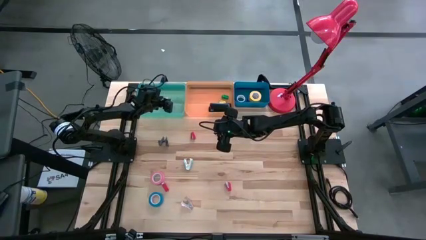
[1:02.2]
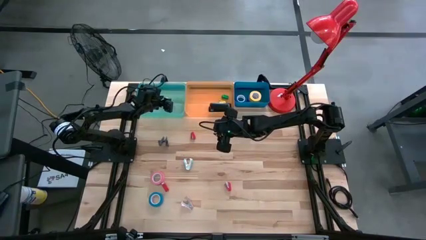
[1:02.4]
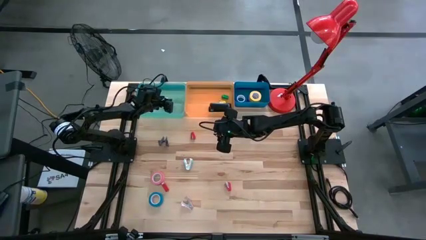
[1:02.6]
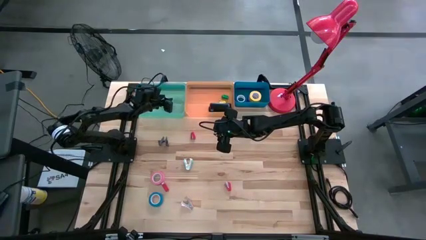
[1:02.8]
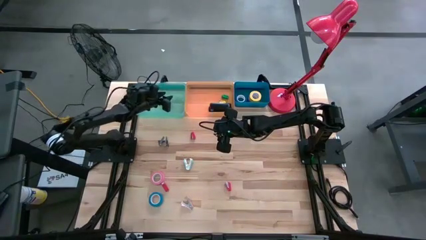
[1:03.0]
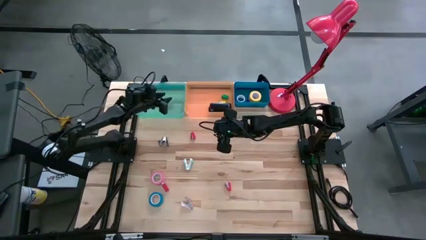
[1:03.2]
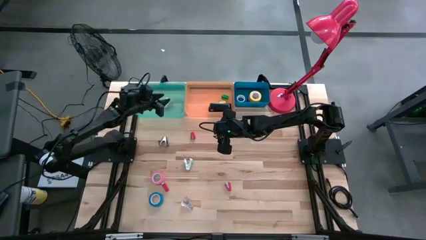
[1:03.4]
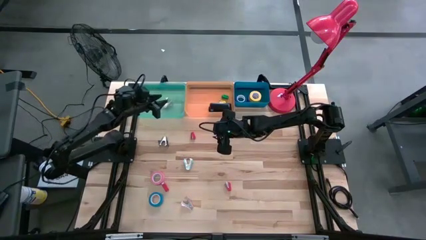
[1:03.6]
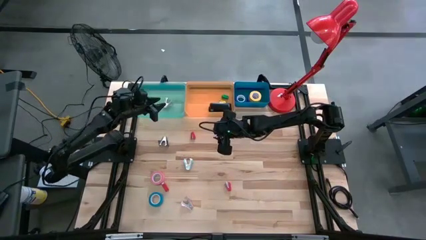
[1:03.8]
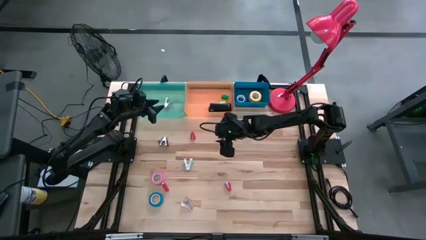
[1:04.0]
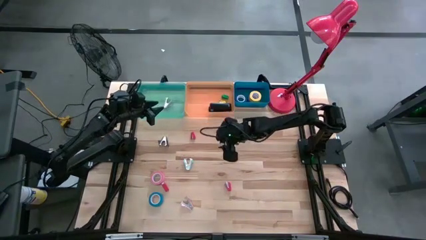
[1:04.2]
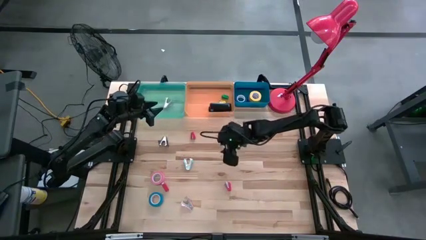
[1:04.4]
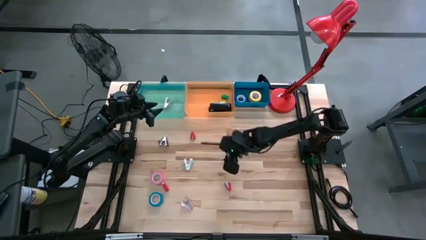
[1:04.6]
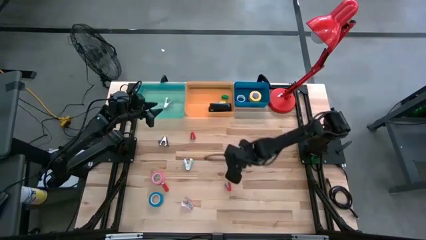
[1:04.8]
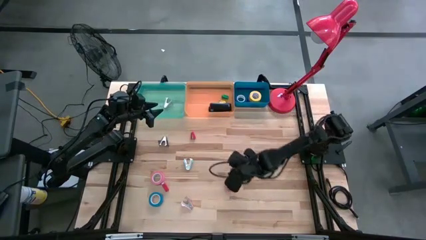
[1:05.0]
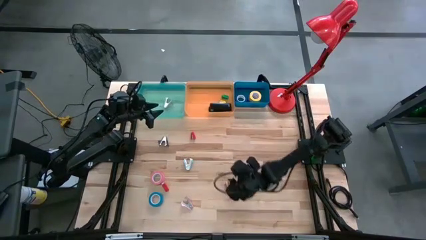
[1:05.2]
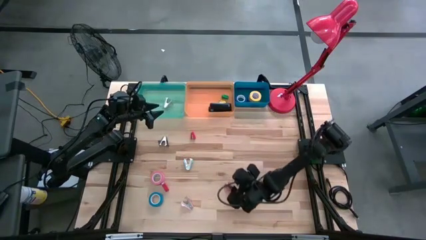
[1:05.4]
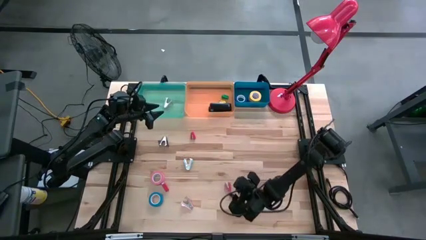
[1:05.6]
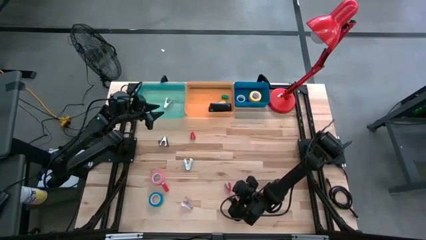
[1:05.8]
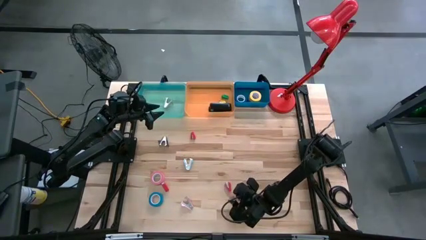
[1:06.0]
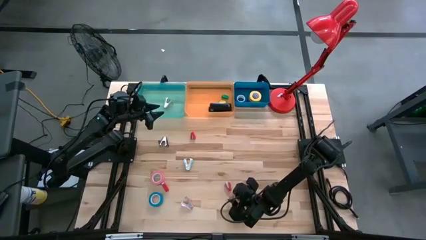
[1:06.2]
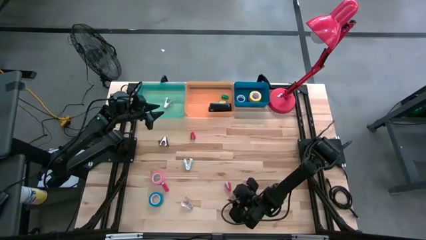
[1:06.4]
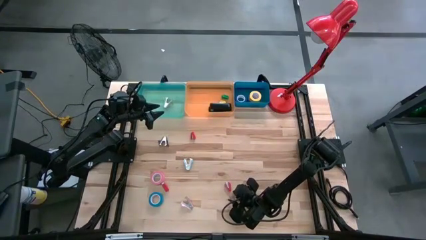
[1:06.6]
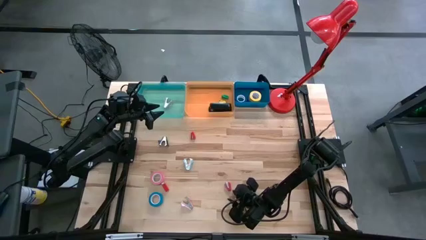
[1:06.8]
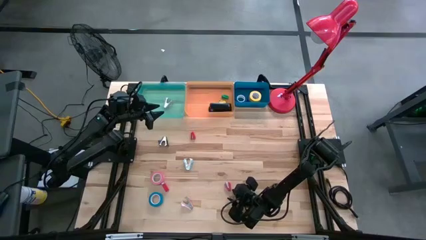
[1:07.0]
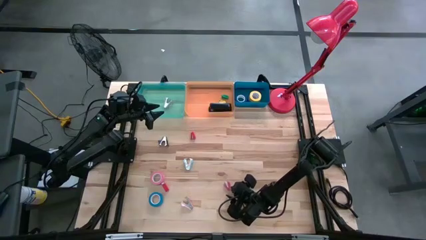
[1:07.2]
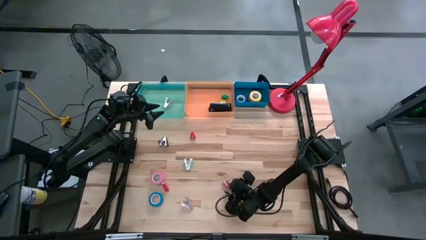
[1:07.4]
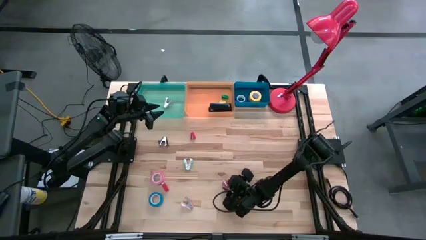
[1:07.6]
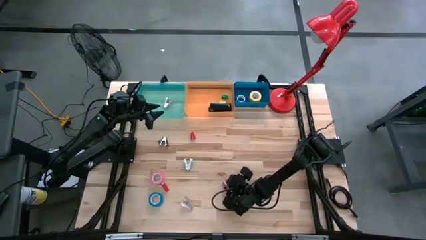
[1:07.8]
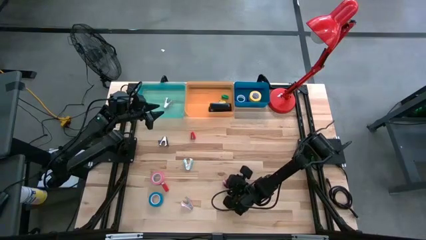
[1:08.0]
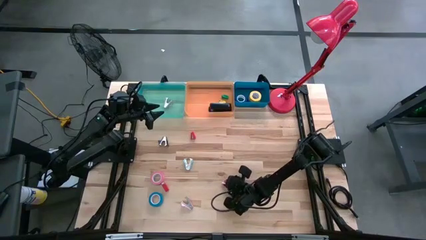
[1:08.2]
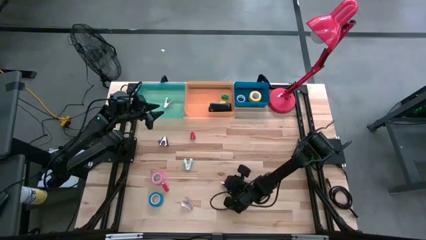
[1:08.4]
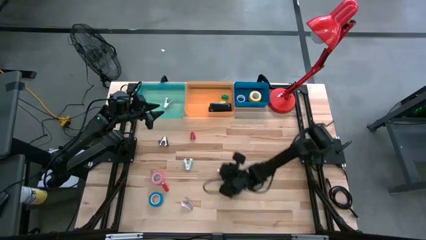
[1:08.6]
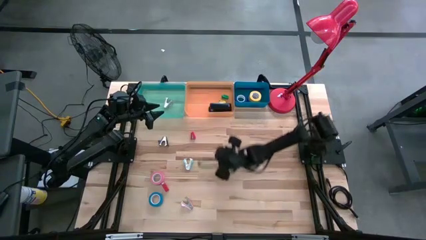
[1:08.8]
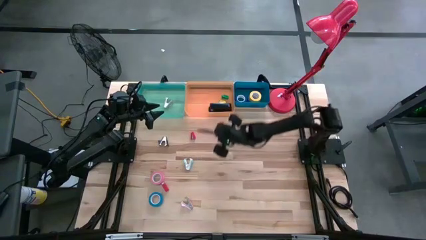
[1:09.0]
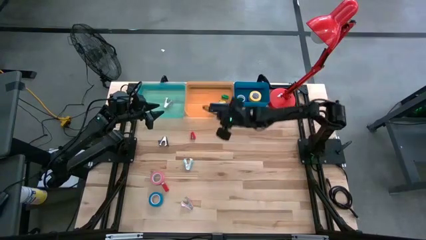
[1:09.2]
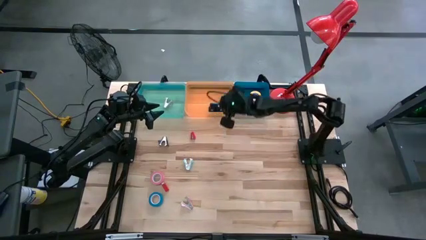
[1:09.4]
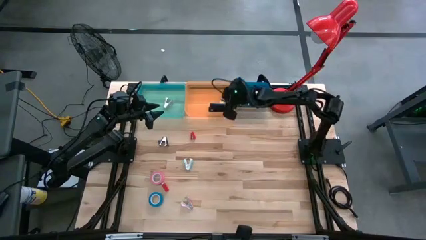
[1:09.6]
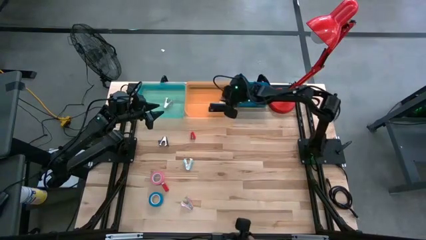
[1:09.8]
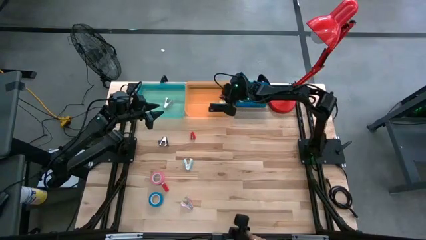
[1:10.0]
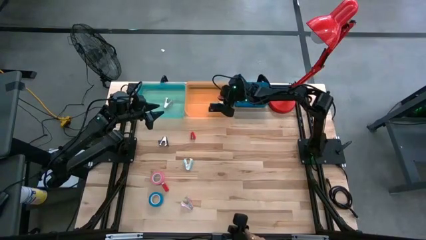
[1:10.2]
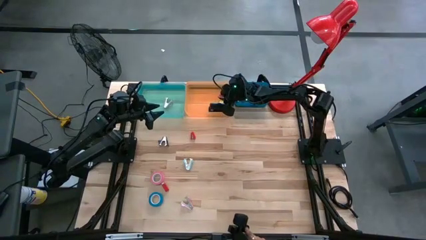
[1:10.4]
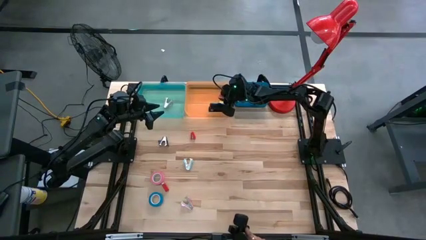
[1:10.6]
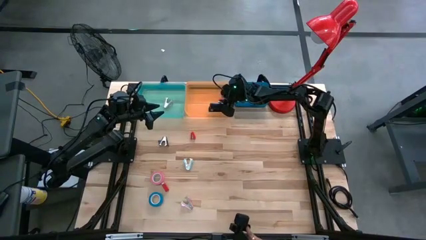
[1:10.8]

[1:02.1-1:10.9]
Task: Pick and place Stapler, Stapler remover, tape
Put the bottom right red stapler into the orange bin

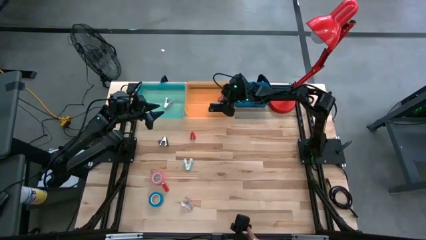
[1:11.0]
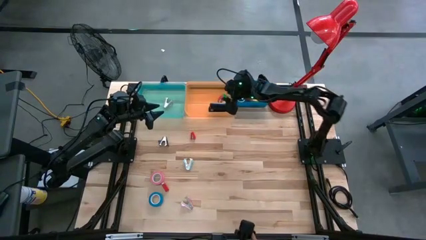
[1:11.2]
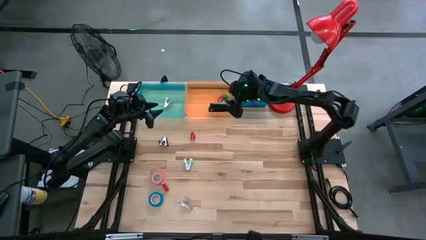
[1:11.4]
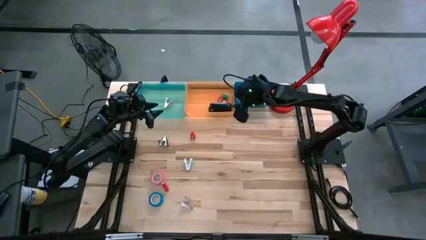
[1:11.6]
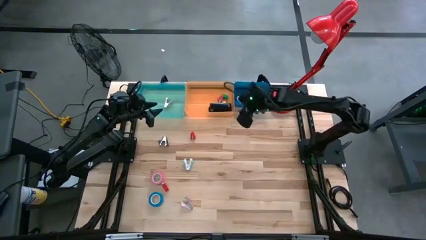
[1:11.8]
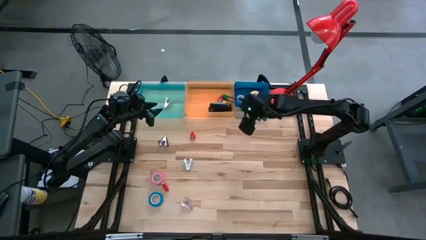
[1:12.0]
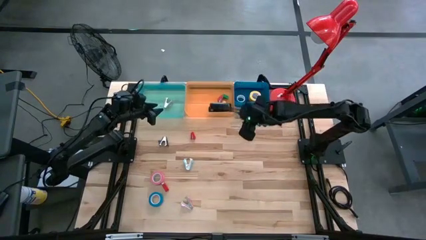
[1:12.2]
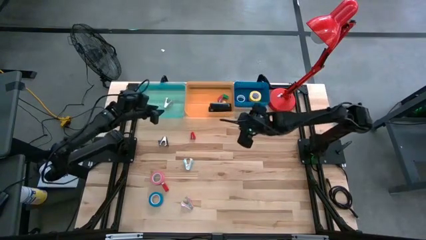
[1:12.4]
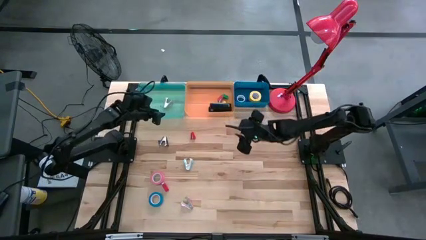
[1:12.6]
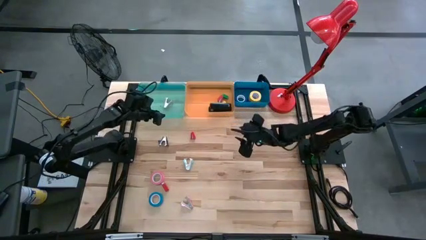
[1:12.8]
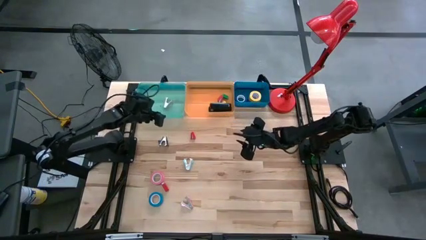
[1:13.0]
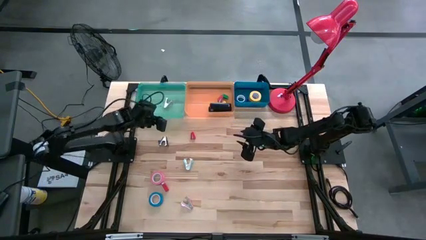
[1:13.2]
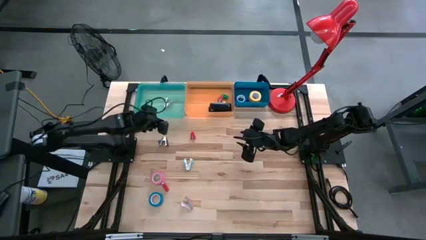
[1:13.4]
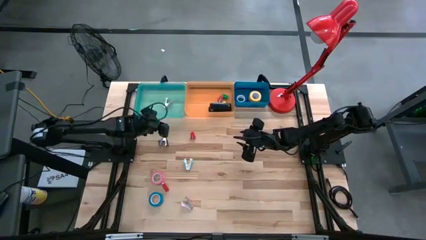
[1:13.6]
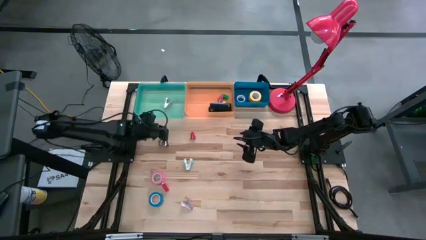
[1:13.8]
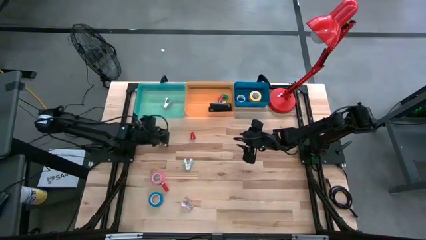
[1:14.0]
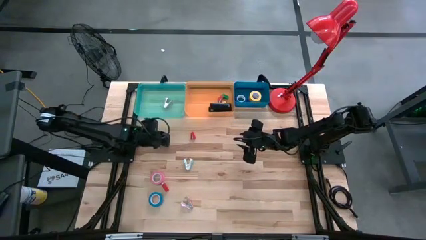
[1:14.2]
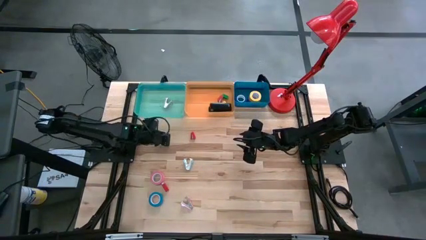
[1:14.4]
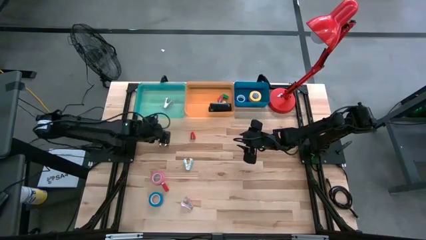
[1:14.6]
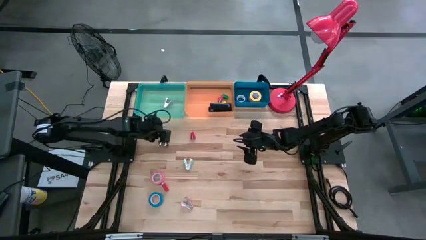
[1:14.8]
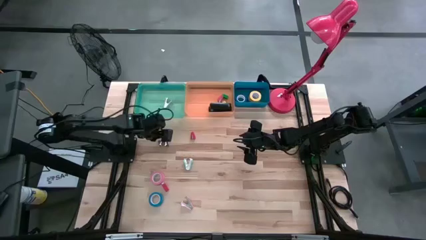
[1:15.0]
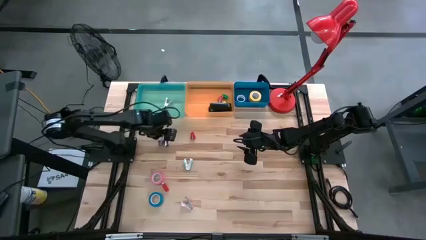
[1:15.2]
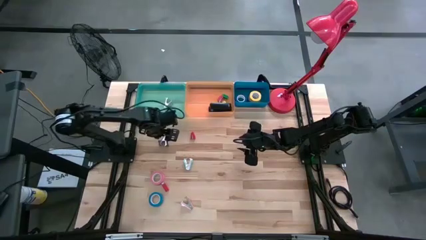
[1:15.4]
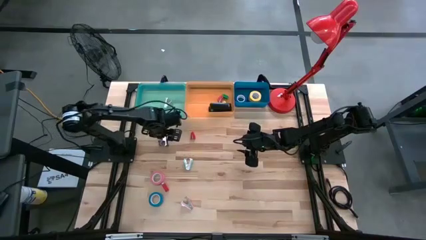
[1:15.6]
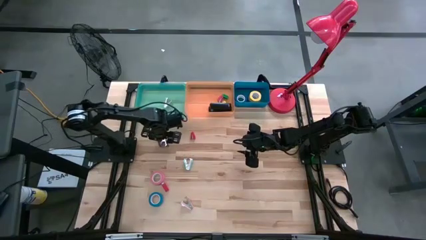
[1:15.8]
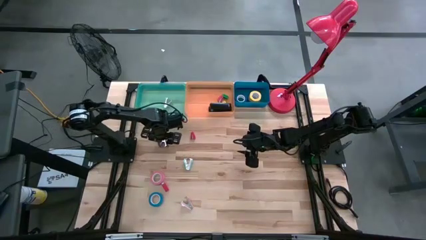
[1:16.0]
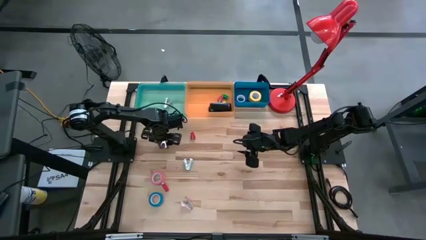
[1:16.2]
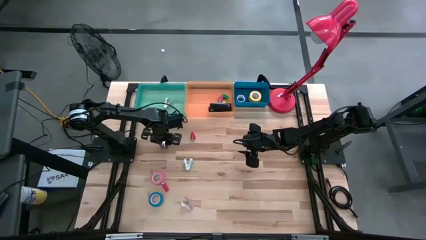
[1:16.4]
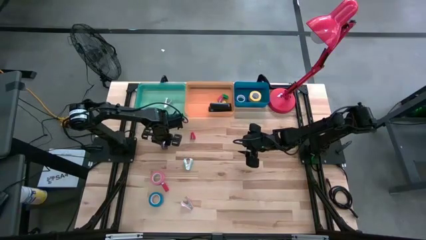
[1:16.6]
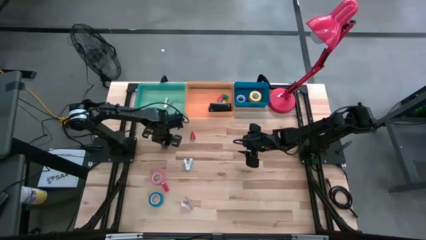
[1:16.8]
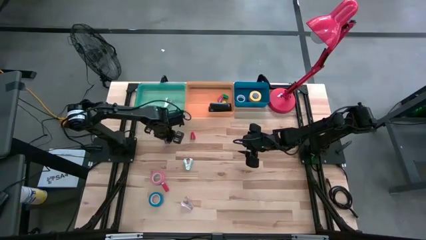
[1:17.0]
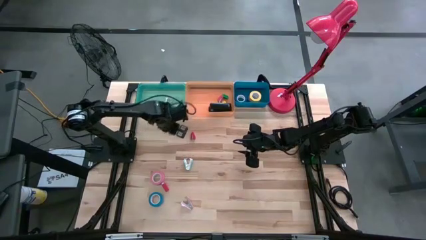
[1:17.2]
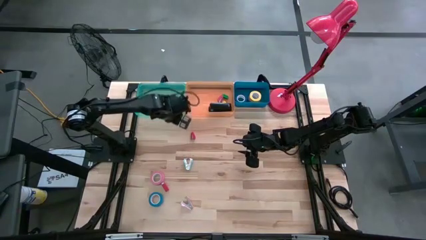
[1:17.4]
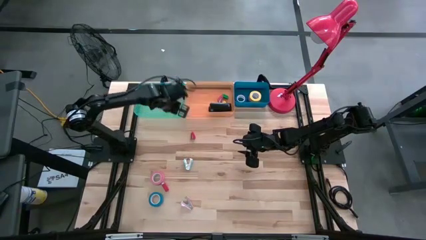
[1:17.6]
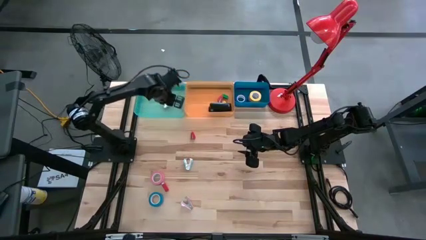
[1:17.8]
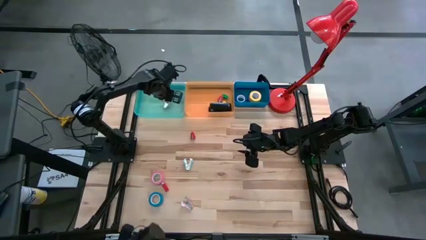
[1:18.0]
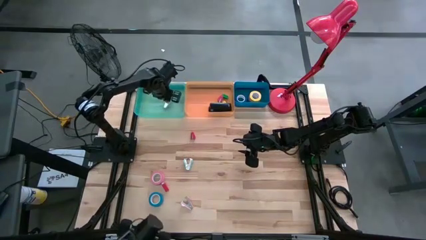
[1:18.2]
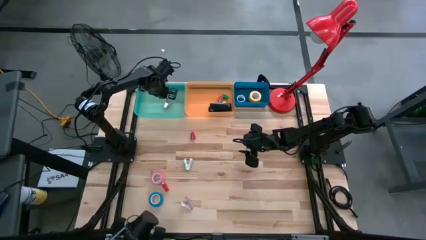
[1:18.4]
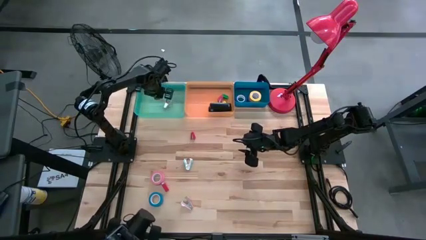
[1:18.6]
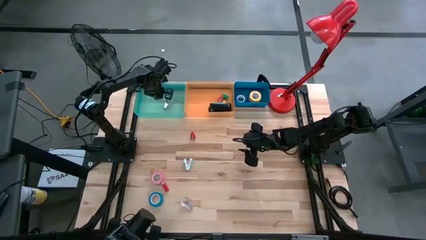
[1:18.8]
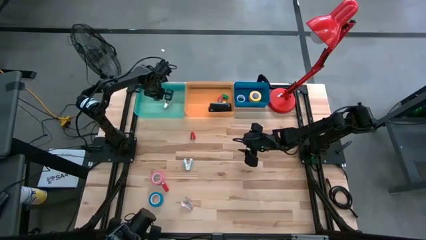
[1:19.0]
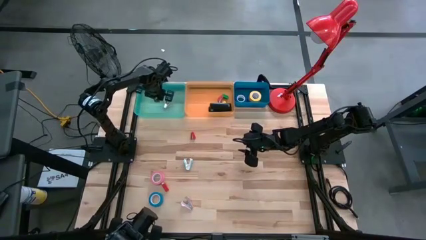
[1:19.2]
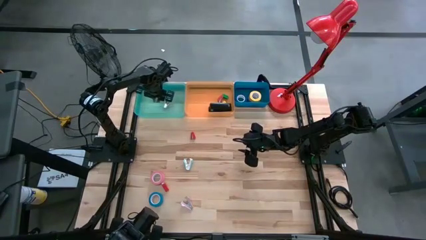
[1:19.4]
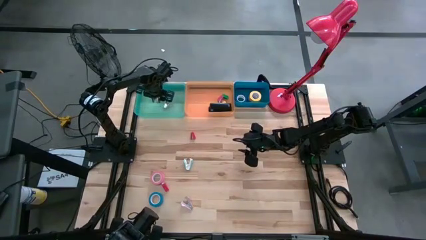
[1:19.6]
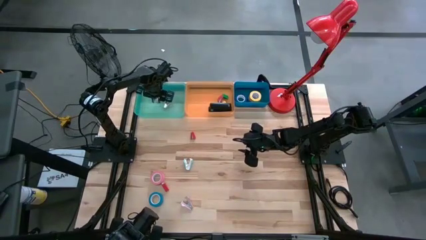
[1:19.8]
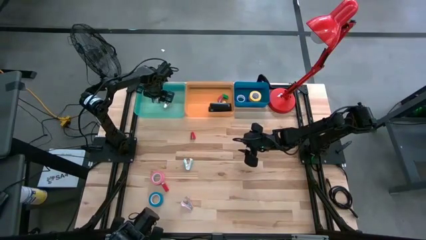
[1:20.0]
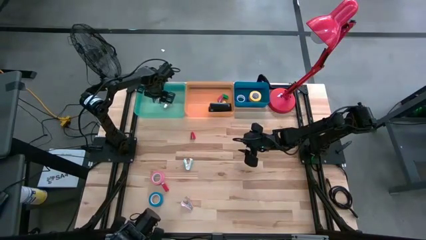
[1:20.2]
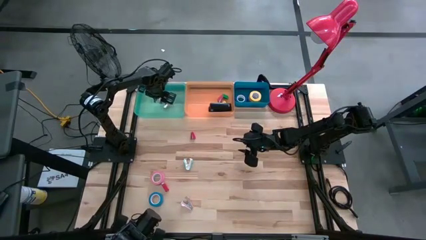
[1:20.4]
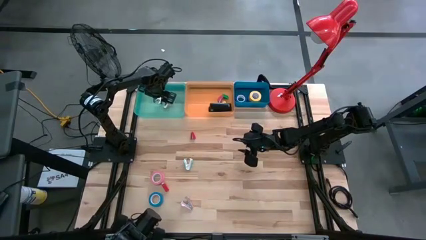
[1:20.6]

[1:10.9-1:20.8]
Put the black staple remover into the green bin
